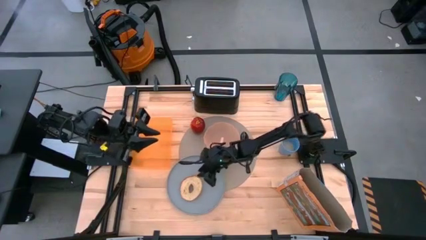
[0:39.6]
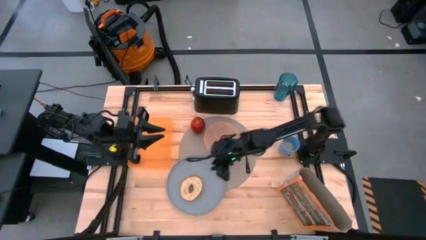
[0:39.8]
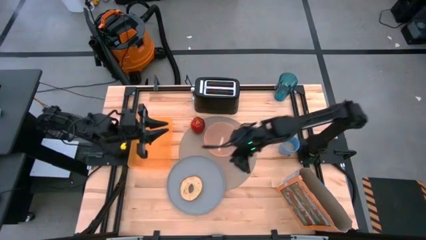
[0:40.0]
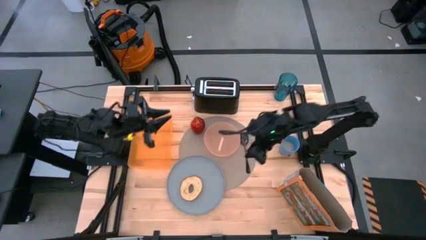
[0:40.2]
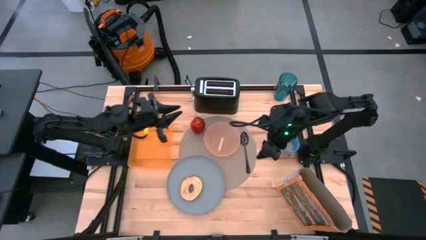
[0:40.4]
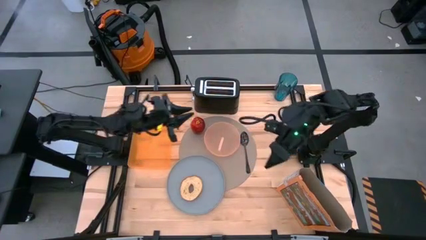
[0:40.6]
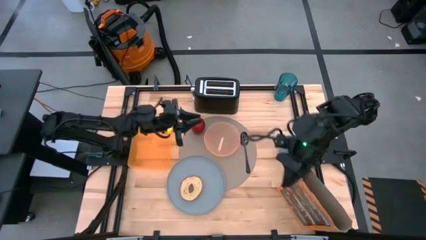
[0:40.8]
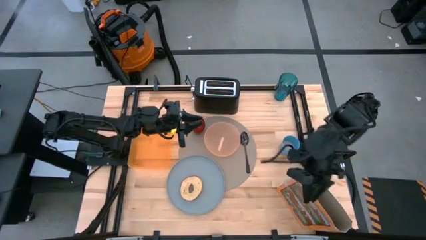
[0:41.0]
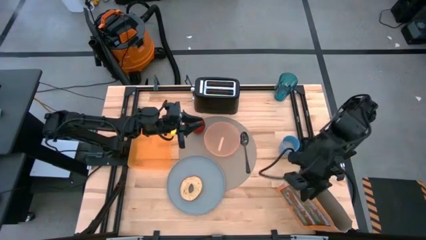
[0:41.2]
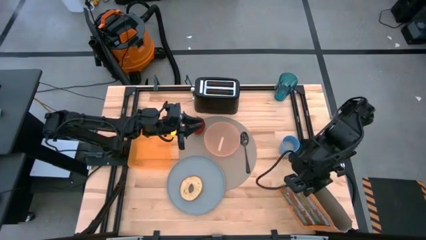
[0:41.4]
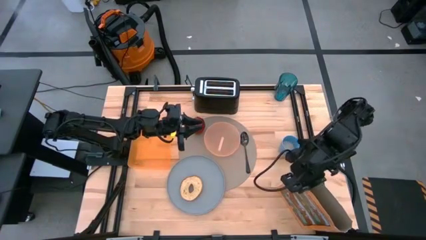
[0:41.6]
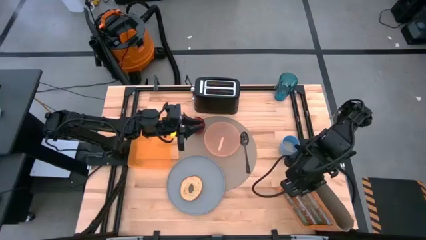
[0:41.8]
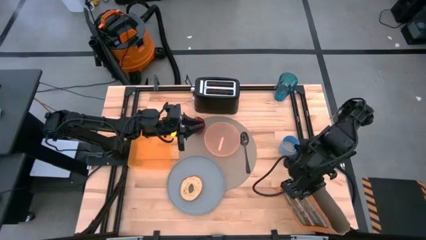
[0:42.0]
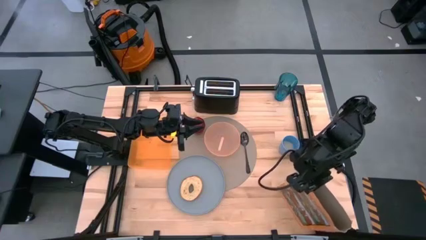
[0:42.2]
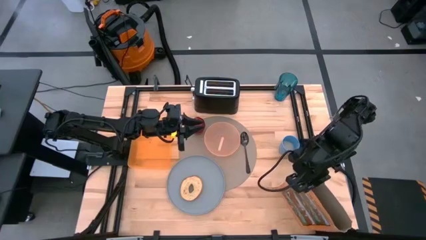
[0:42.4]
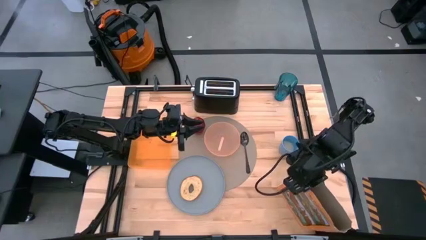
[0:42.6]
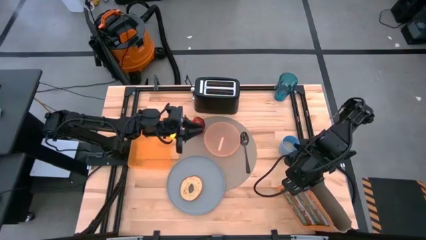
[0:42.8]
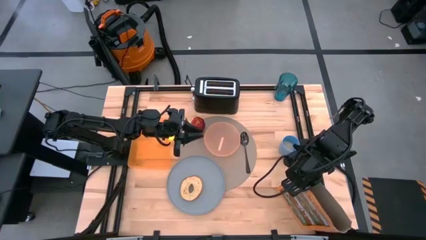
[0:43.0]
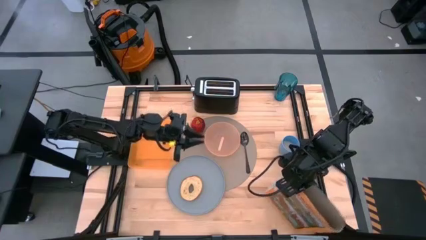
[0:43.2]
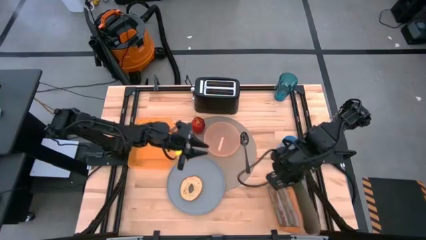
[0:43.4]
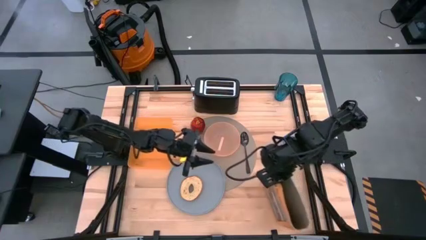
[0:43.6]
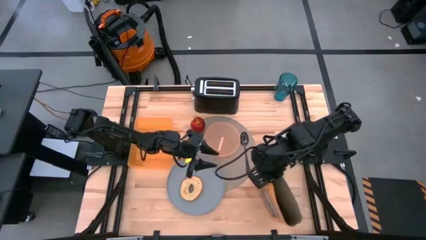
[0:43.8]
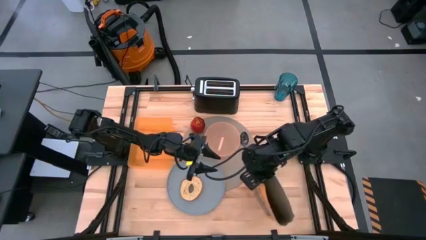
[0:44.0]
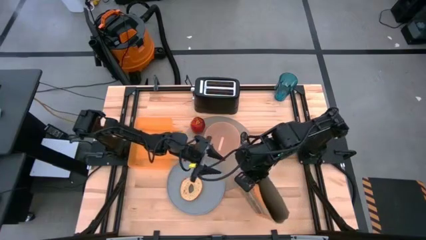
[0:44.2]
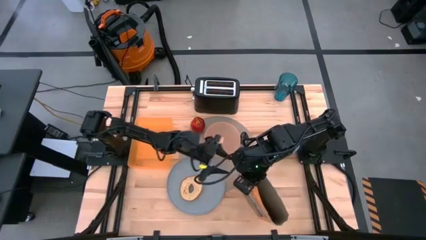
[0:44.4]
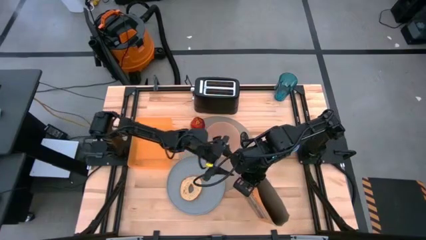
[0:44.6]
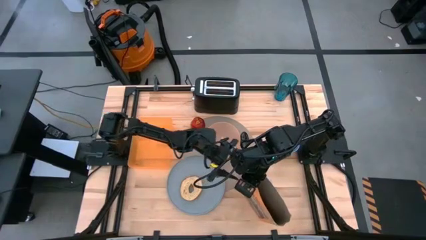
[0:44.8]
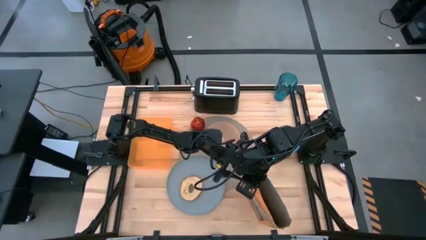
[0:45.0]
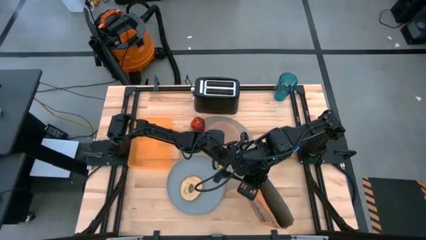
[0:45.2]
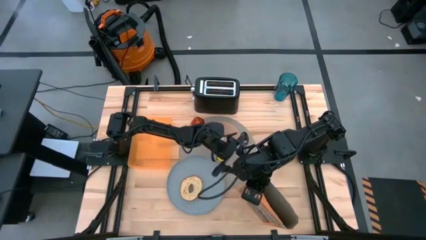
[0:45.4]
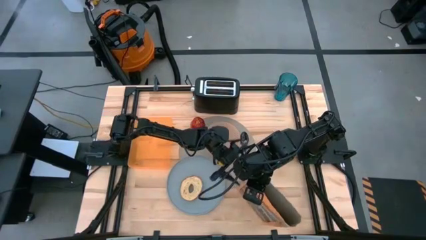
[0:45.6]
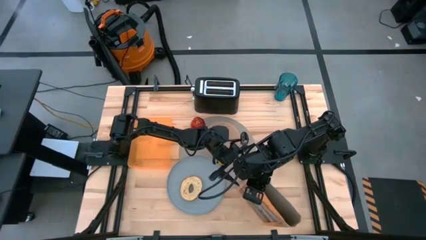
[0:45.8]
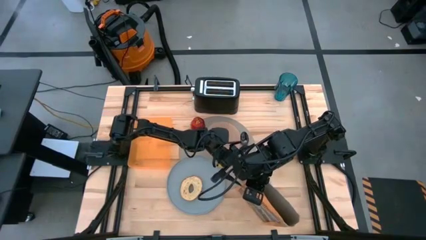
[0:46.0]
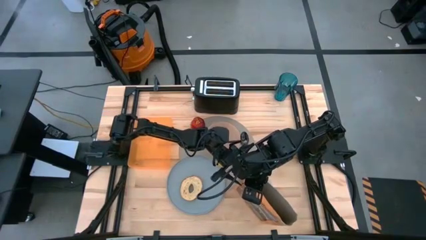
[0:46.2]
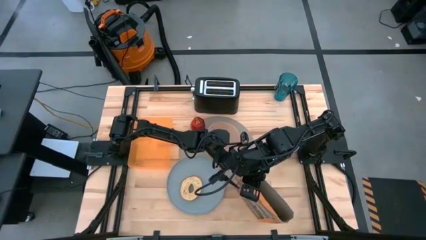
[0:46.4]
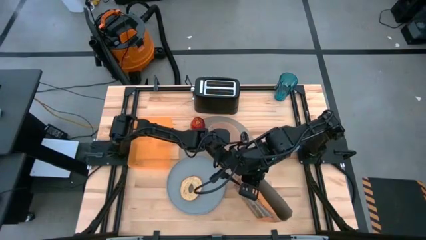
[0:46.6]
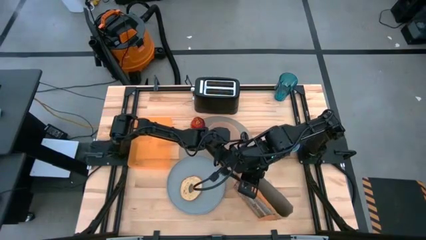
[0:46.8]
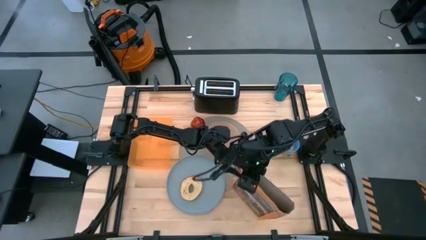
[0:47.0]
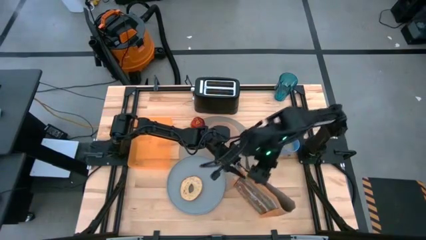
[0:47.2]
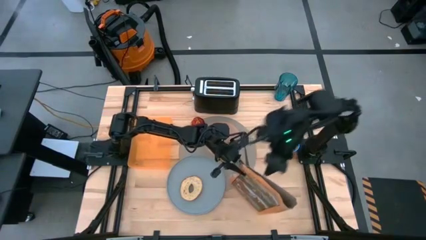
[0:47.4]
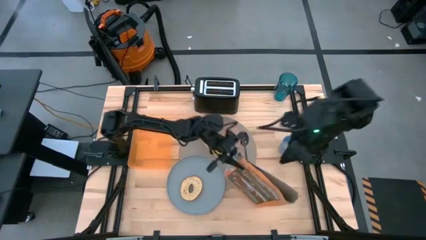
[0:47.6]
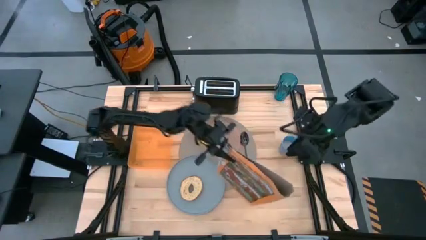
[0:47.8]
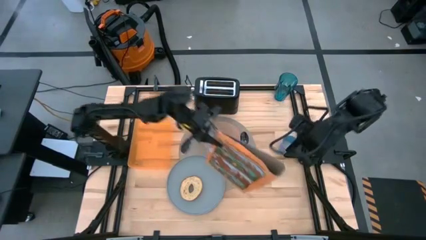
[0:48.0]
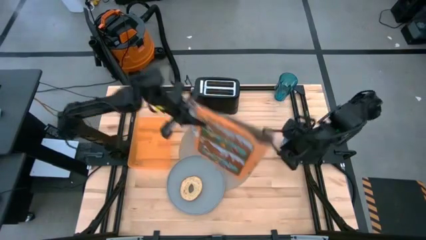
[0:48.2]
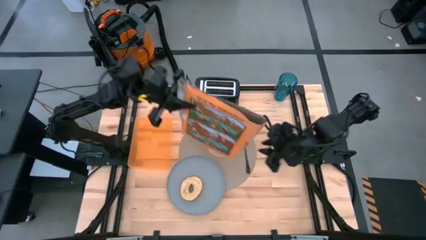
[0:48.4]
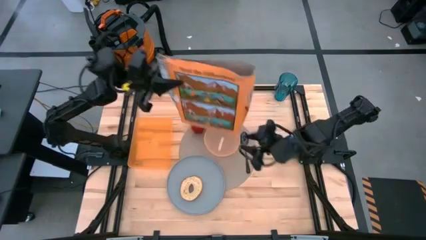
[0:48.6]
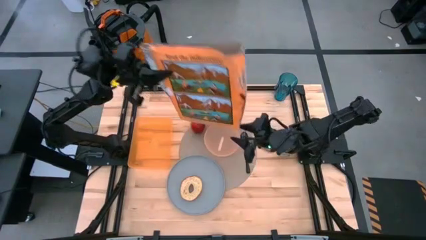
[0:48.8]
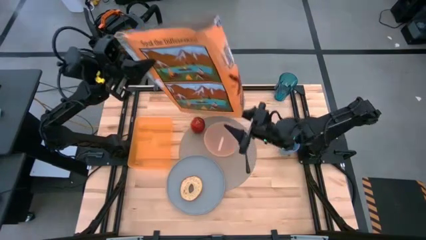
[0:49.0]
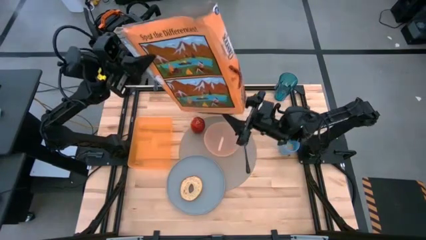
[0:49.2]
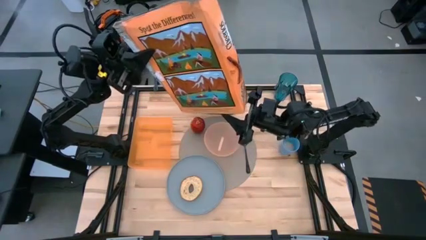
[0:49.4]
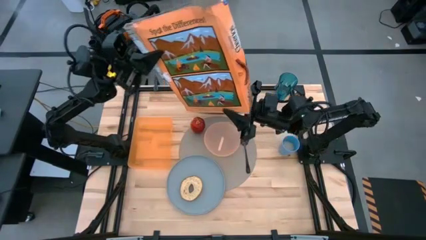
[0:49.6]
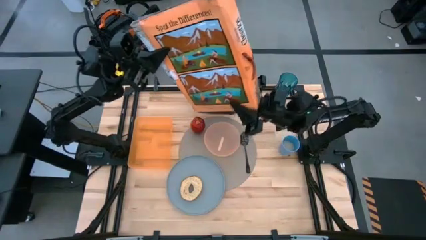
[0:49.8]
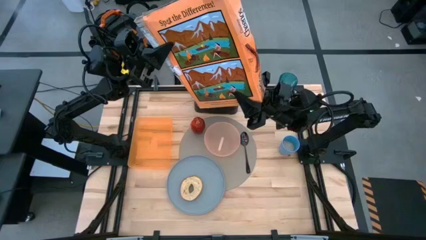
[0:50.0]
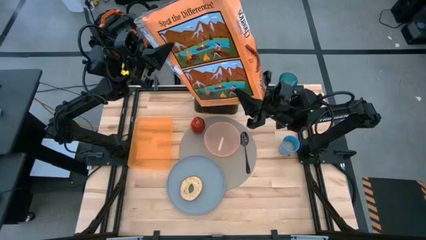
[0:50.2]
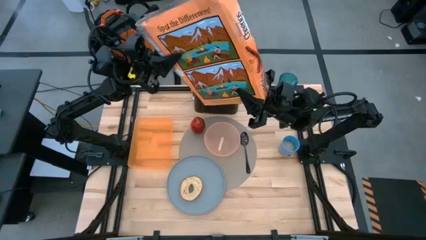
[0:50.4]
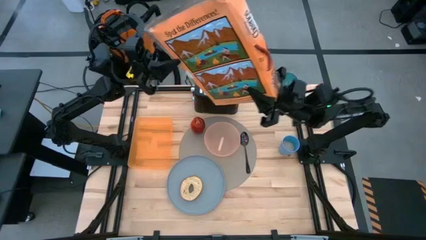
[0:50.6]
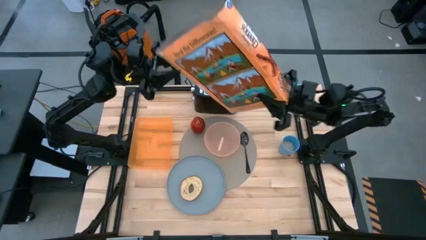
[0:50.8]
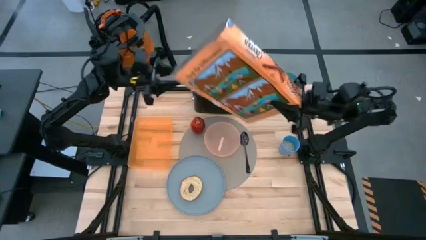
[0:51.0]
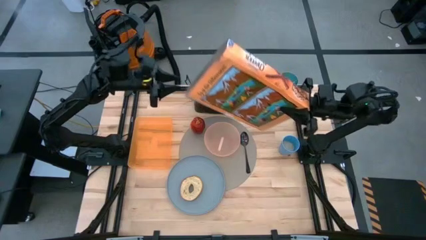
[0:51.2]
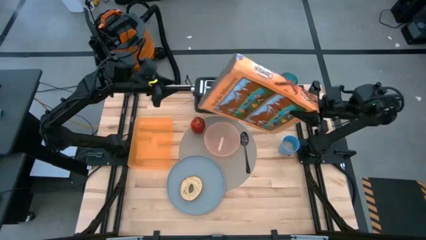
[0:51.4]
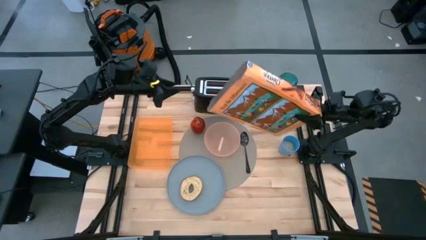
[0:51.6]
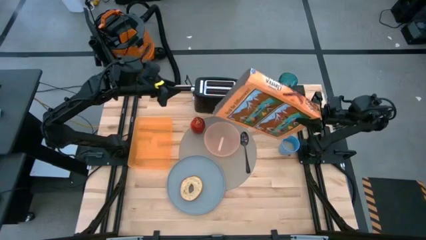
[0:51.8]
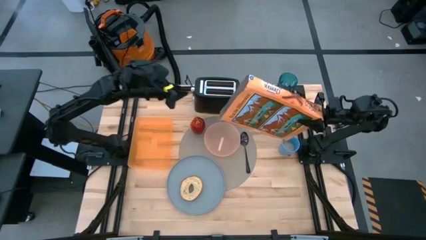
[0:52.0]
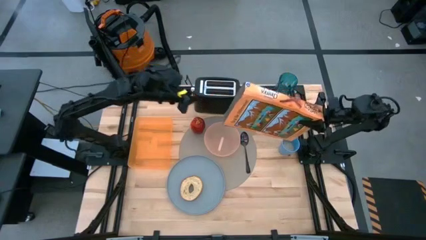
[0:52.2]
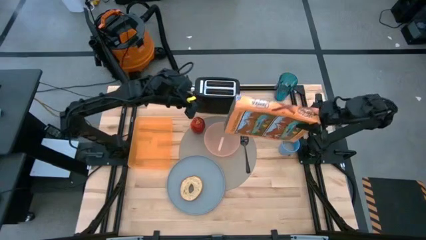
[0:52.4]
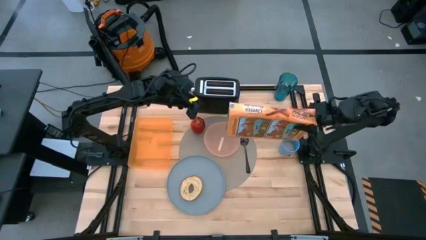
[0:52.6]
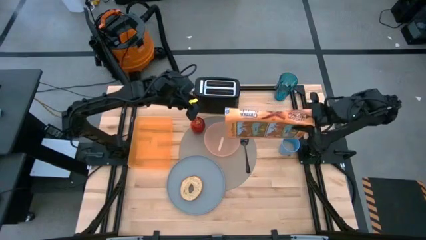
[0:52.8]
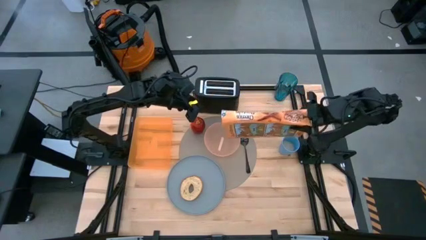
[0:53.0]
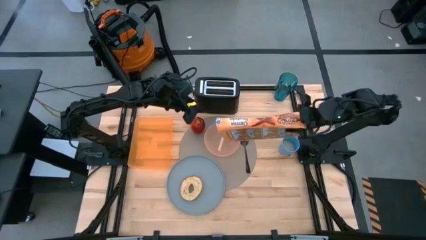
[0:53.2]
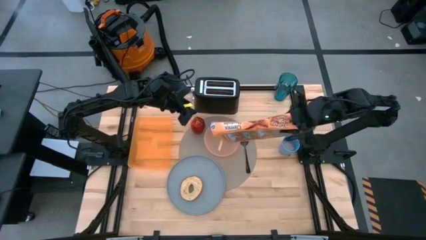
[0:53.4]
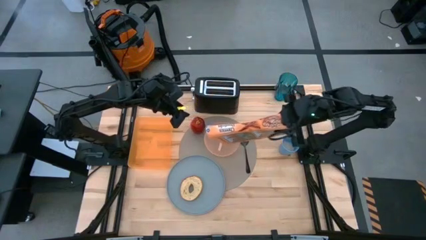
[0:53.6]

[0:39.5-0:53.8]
Task: Arrange a breakfast setting
Pour the cereal from the cereal box into the orange bowl

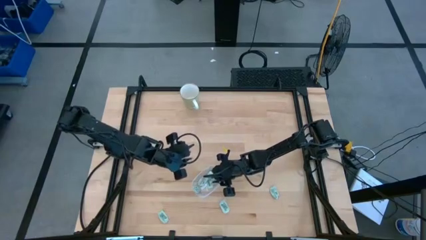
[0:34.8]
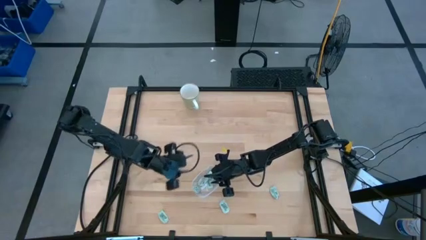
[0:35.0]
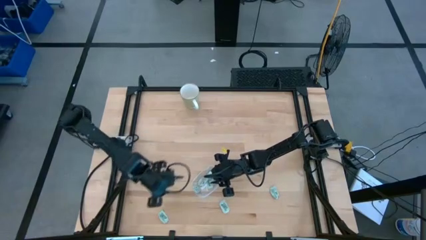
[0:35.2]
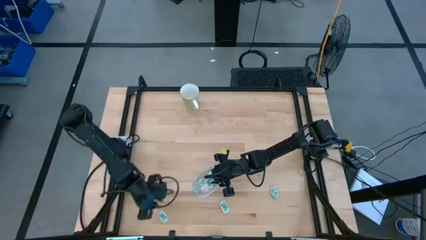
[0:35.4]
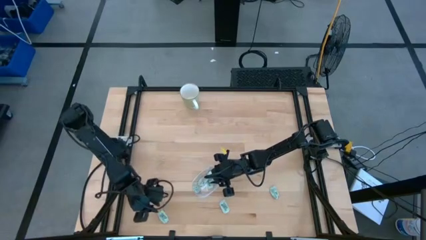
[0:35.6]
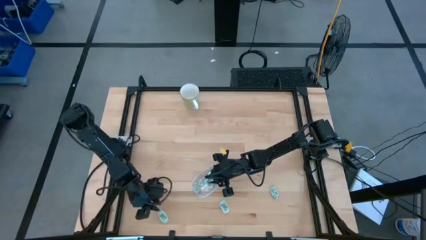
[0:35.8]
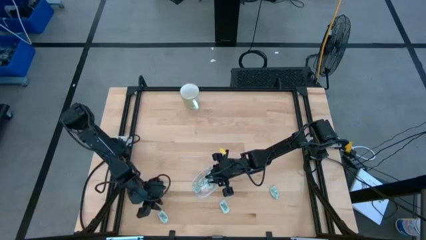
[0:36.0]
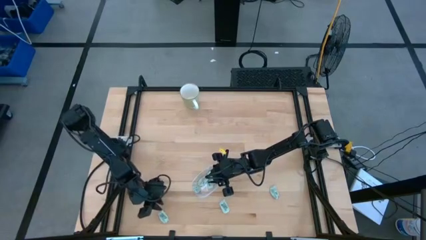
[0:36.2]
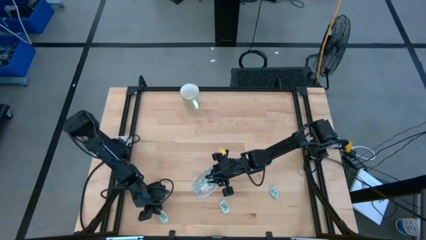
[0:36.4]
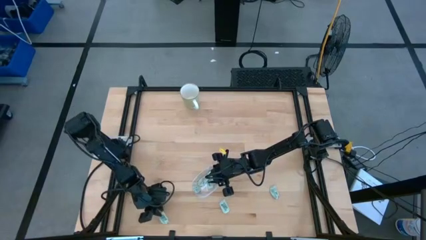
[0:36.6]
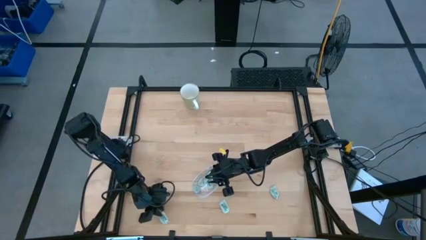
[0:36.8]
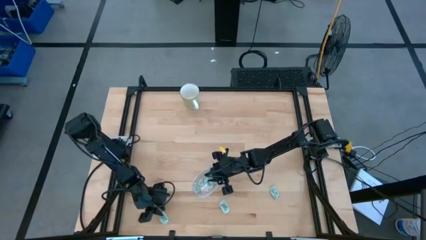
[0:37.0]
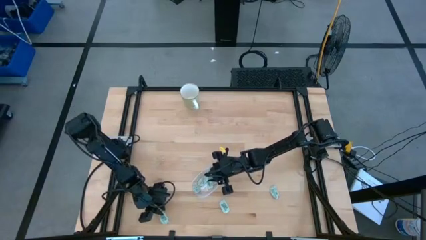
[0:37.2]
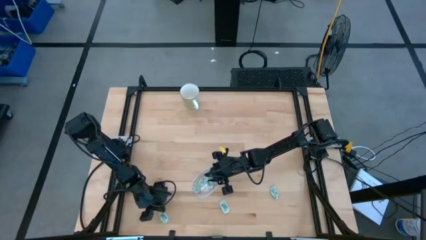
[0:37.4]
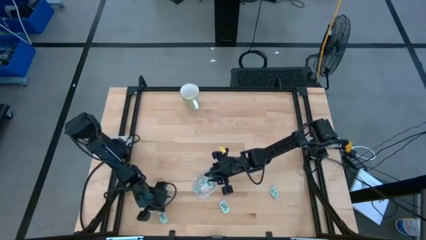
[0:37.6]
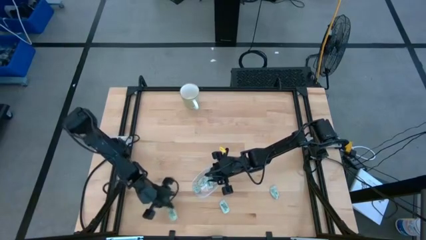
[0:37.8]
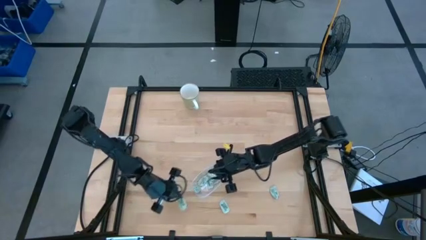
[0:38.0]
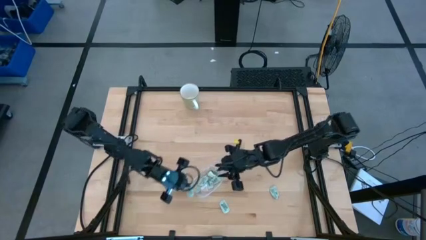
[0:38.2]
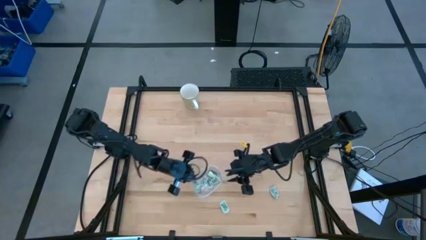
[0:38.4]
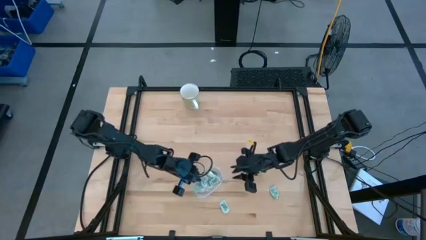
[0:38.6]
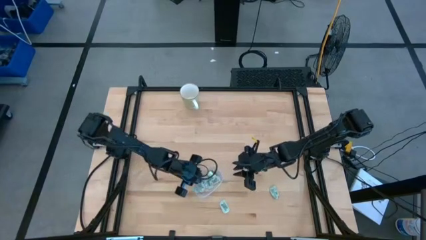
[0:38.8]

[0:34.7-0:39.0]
Task: Pick and place Stevia / Truvia into bins
Put the light green stevia packet into the transparent bin
